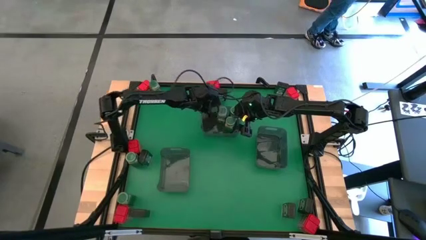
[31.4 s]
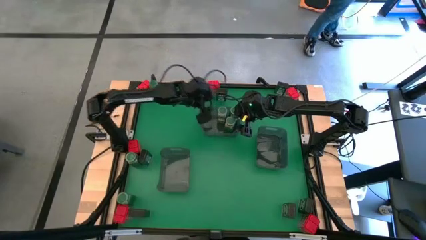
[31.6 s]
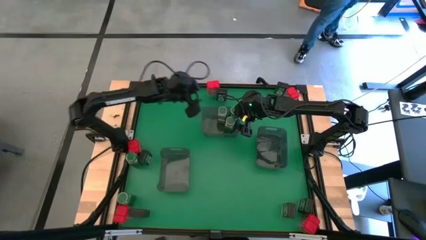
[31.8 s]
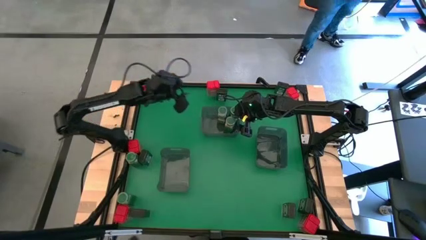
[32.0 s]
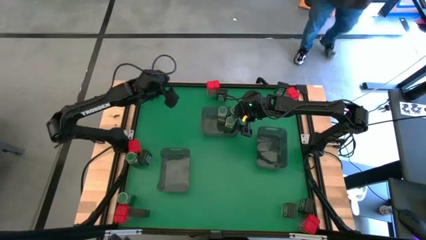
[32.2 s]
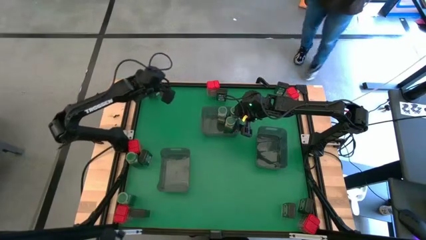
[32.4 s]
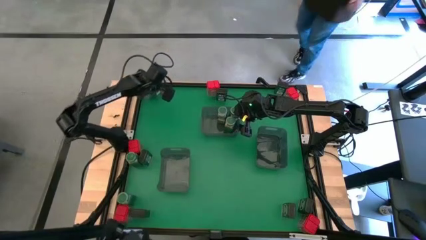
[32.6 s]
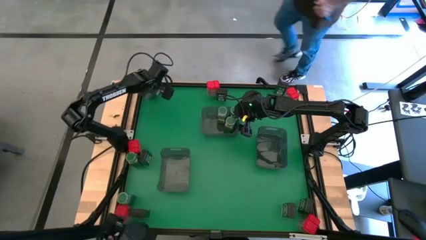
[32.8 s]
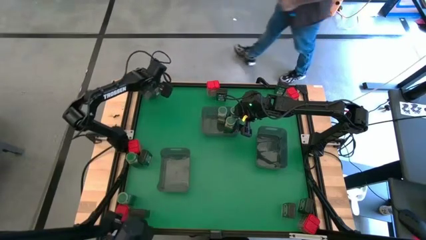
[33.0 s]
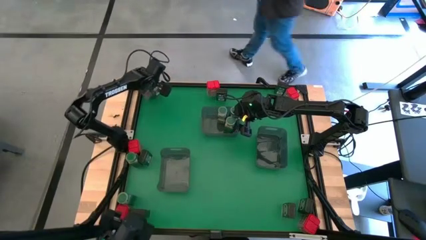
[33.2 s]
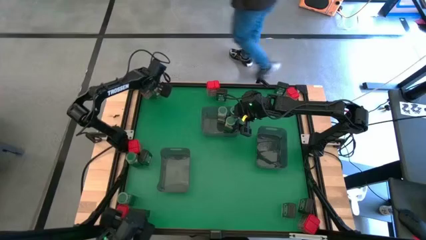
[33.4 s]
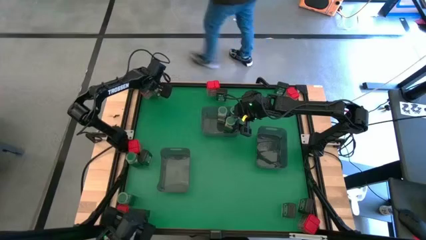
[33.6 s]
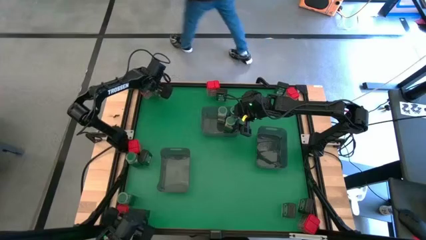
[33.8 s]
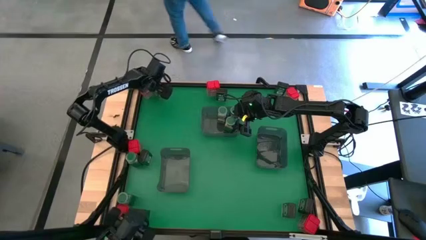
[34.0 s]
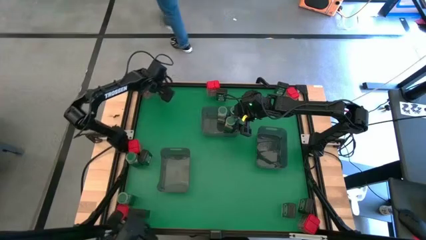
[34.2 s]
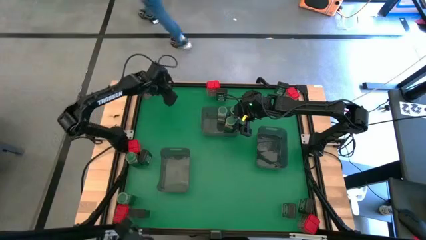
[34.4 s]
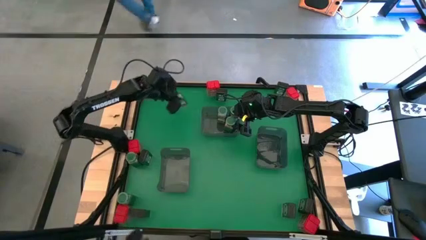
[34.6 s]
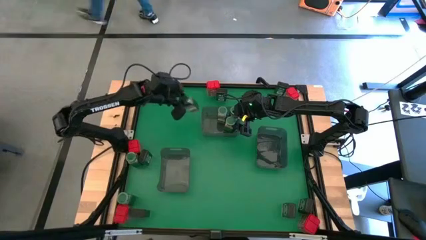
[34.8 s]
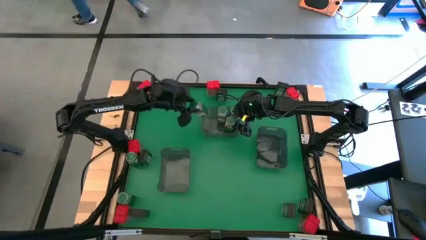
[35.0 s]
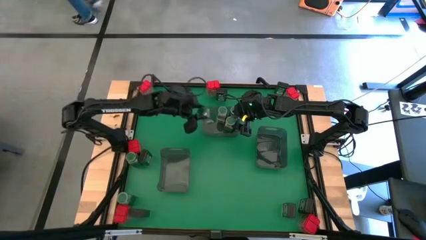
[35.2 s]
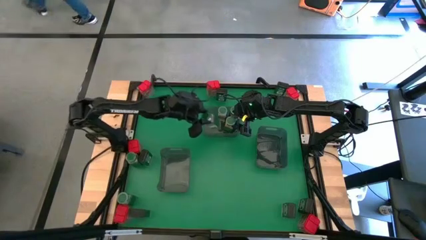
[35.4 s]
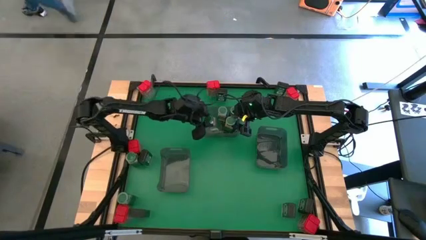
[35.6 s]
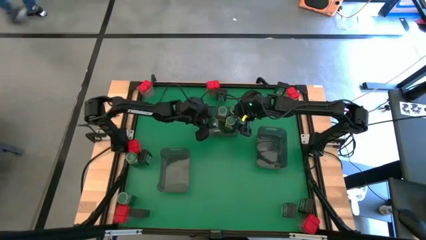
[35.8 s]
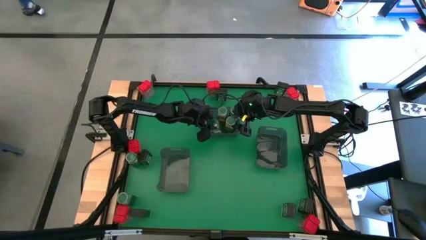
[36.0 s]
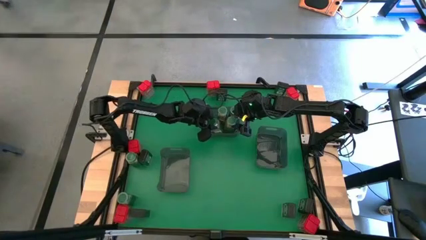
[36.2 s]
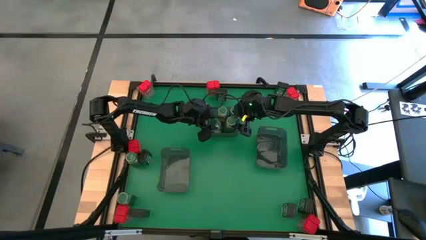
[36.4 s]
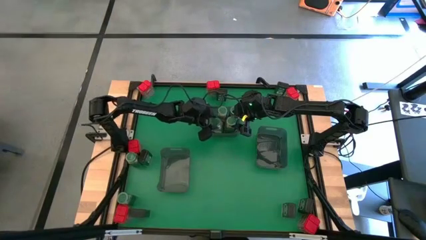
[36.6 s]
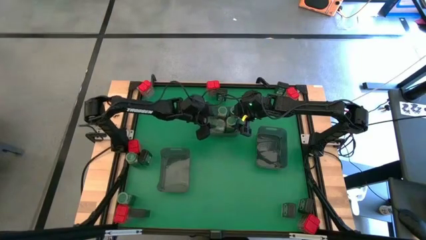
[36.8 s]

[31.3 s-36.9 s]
Task: Sort spices by type
Put the green seasoning bottle into the top black bin

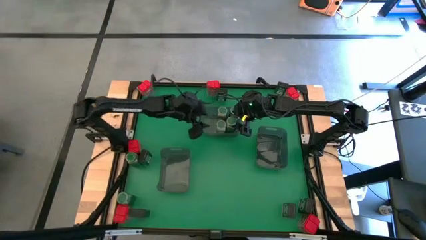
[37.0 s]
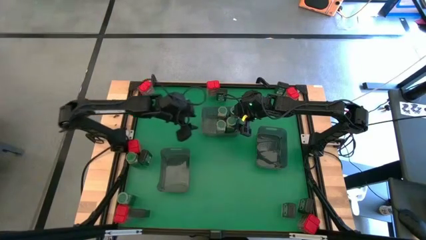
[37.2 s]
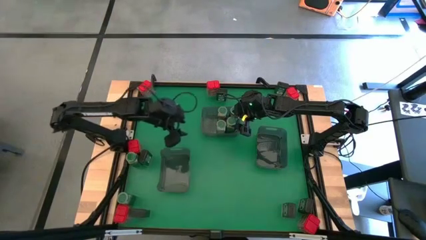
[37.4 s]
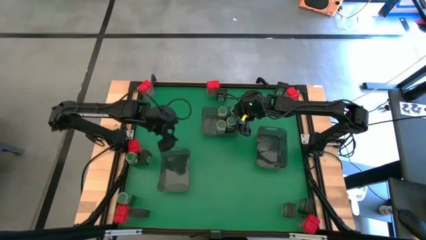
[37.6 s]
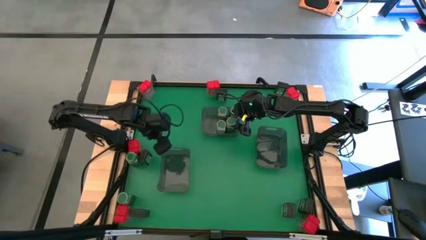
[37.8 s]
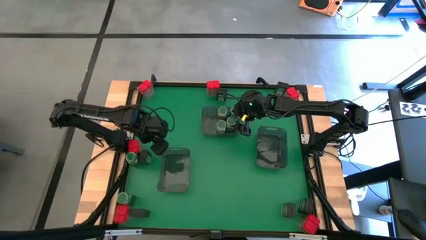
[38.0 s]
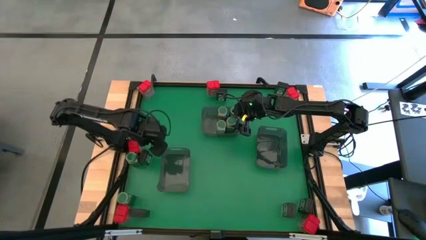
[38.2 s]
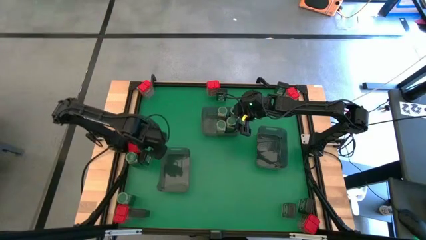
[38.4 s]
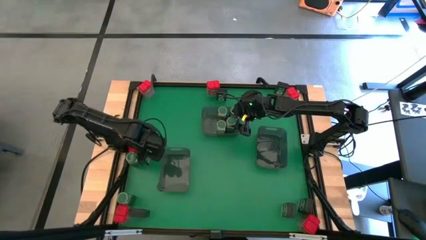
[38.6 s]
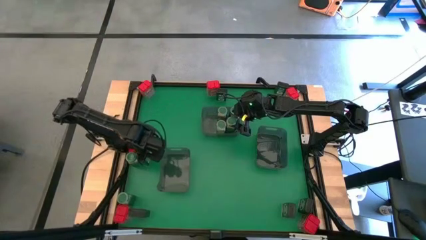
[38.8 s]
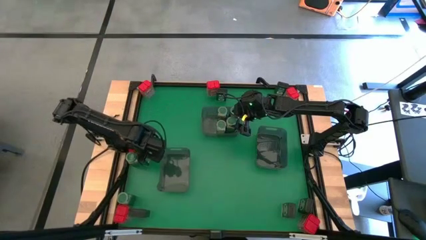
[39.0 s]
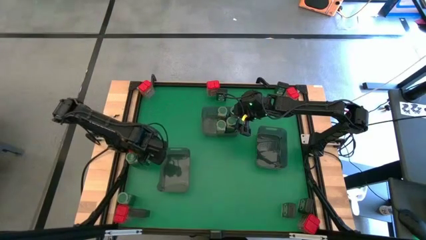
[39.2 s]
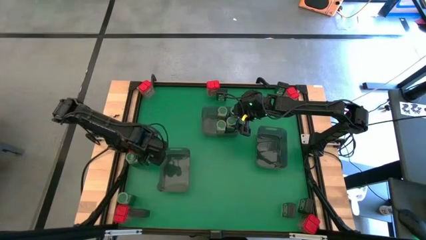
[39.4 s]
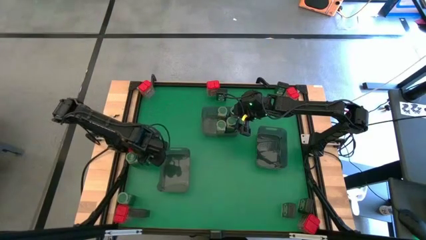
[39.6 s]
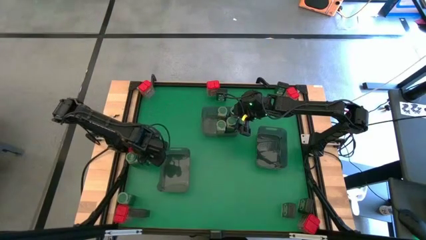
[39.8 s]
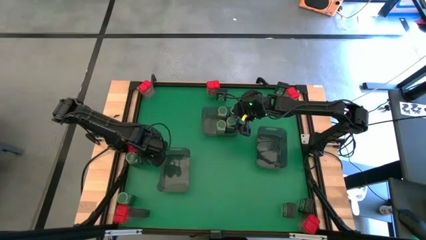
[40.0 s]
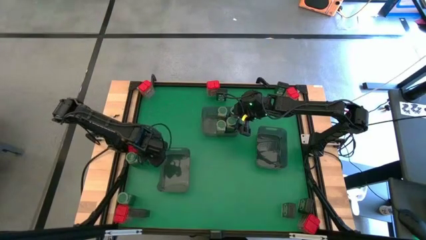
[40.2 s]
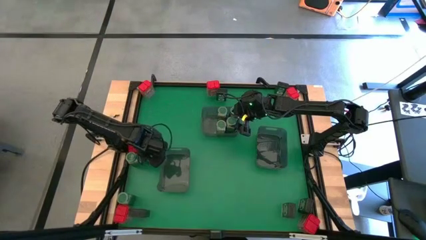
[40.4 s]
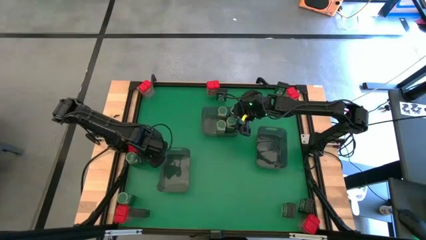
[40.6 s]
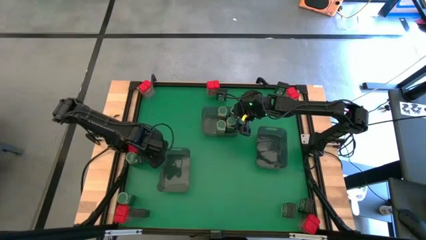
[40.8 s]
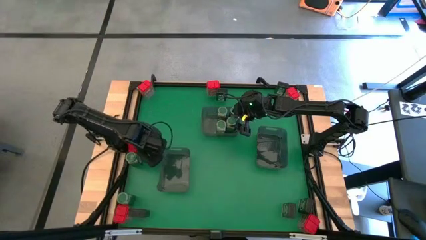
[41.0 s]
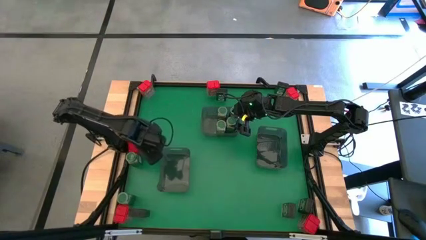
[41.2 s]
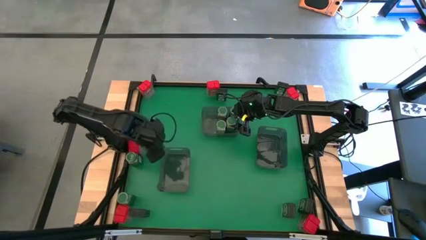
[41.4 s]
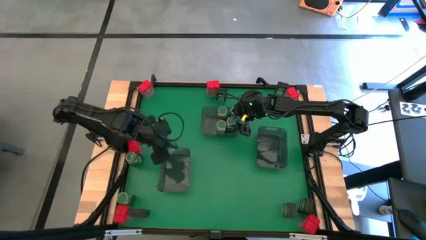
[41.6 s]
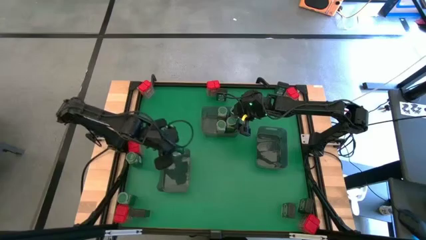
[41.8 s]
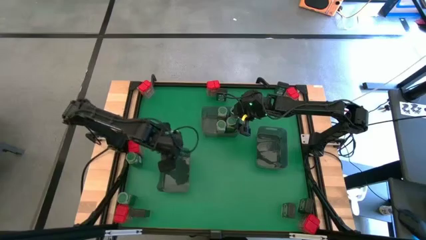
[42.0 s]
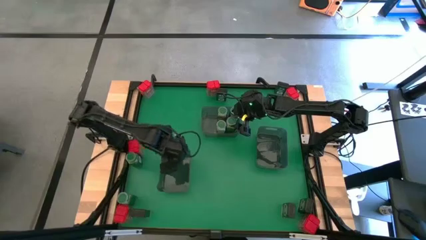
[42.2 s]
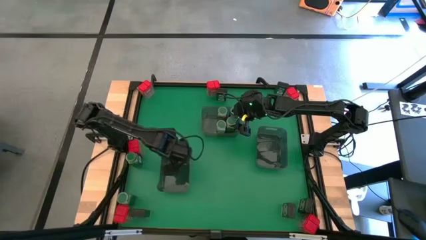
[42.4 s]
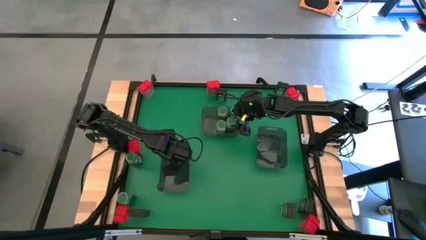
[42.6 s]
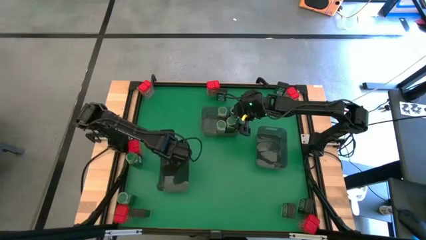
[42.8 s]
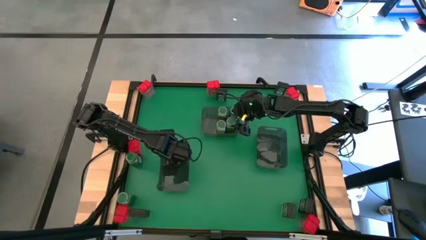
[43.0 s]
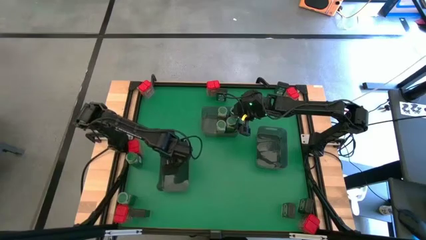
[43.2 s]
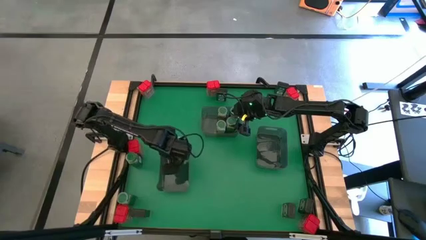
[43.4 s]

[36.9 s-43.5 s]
Put the black seasoning can into the left black bin

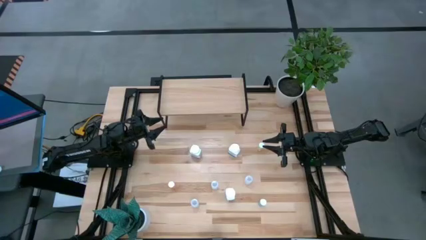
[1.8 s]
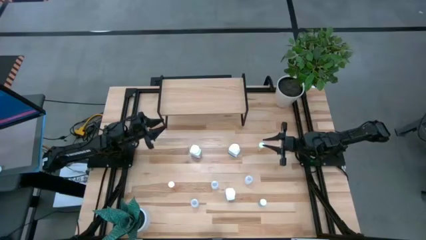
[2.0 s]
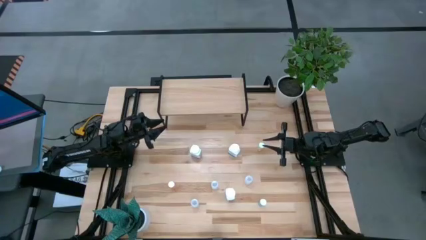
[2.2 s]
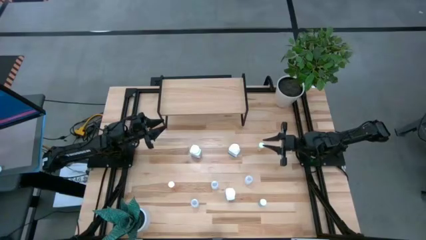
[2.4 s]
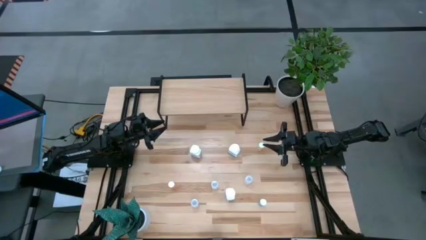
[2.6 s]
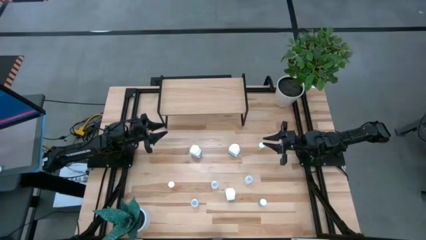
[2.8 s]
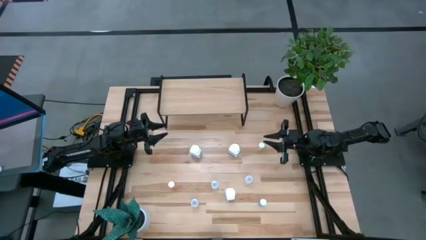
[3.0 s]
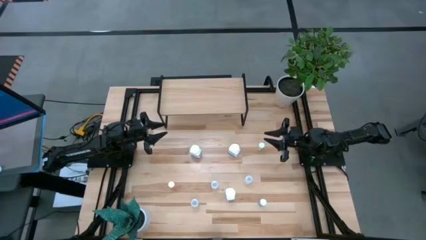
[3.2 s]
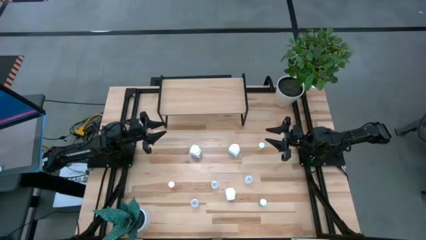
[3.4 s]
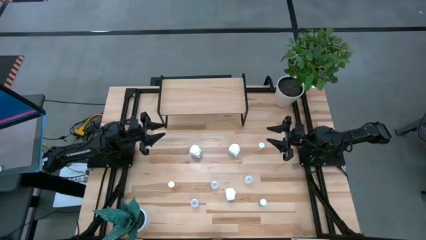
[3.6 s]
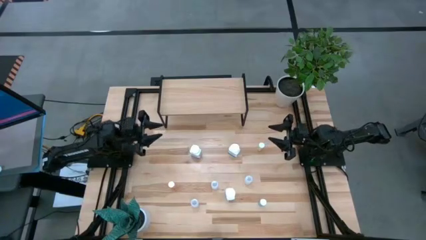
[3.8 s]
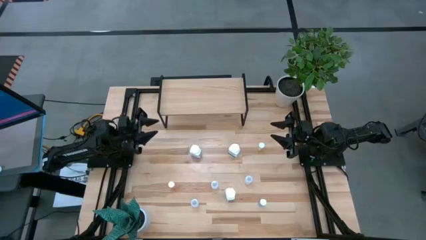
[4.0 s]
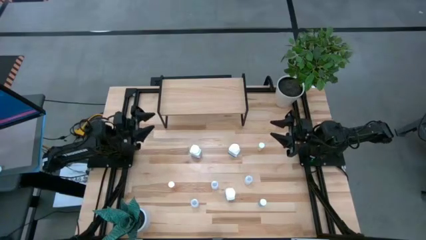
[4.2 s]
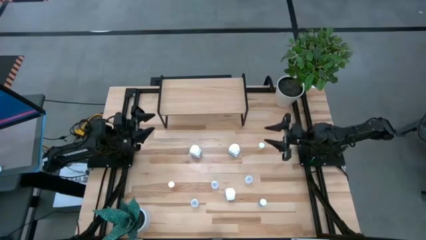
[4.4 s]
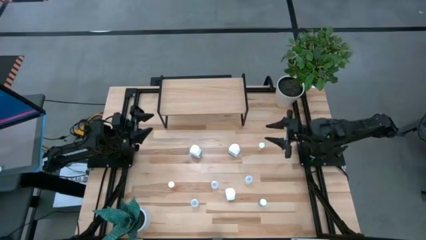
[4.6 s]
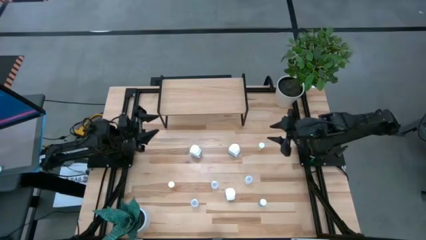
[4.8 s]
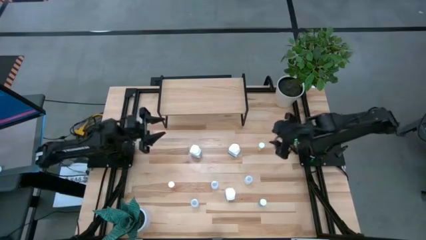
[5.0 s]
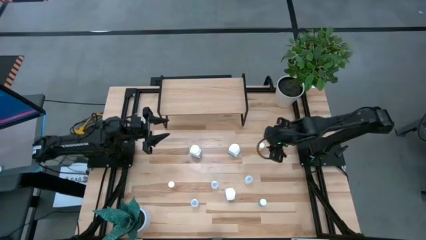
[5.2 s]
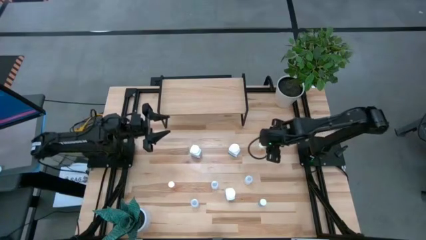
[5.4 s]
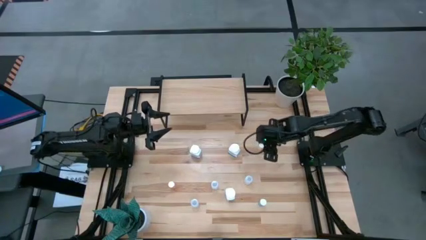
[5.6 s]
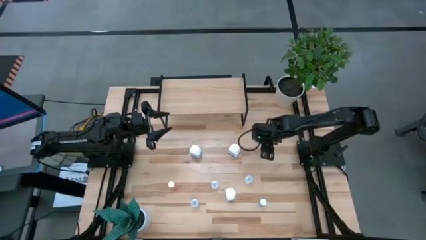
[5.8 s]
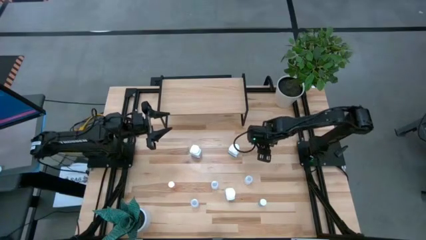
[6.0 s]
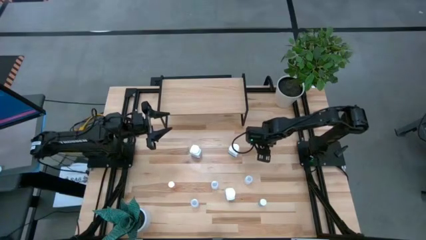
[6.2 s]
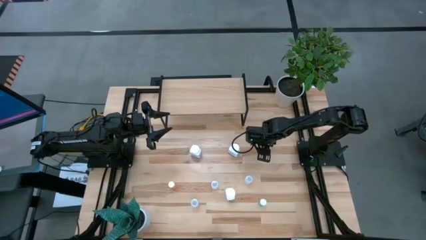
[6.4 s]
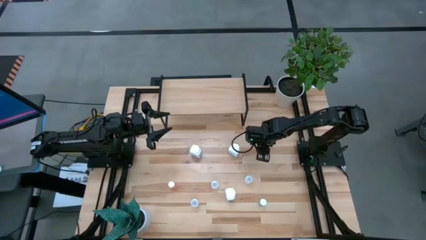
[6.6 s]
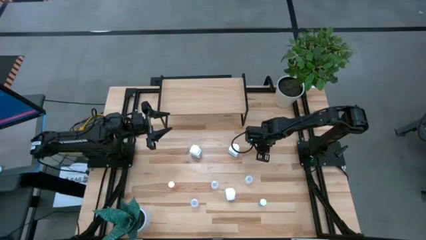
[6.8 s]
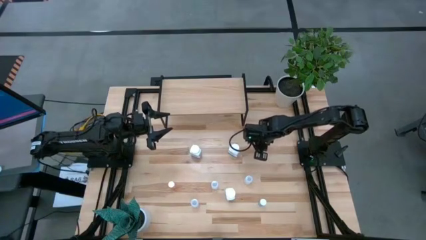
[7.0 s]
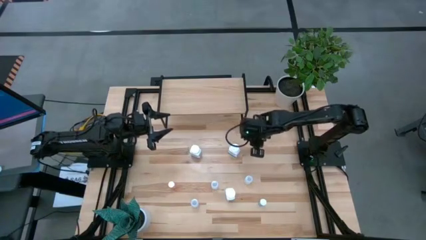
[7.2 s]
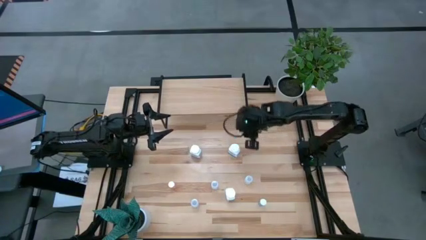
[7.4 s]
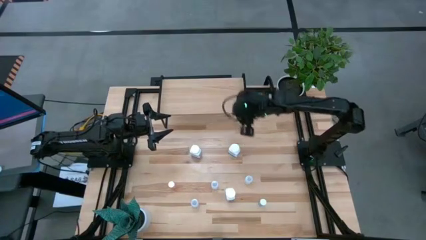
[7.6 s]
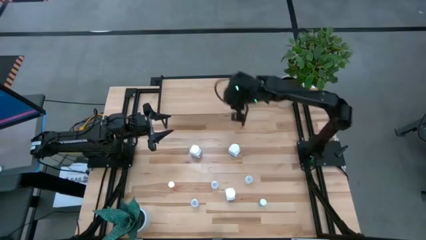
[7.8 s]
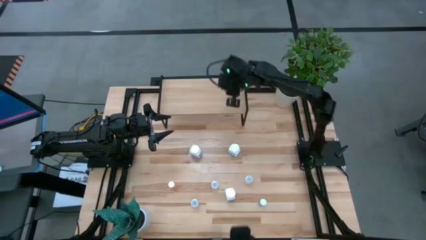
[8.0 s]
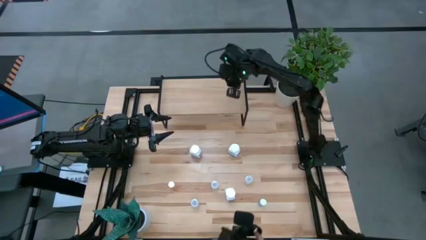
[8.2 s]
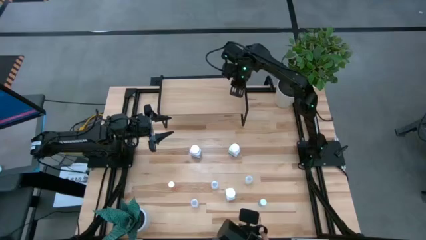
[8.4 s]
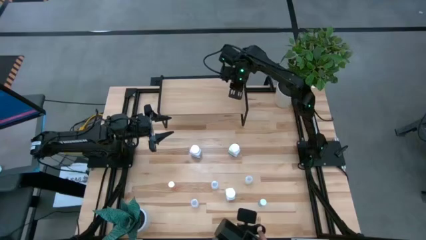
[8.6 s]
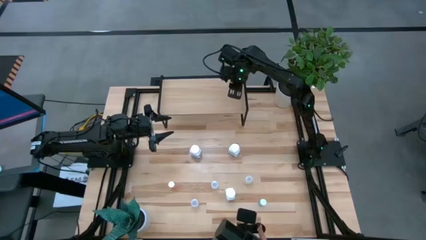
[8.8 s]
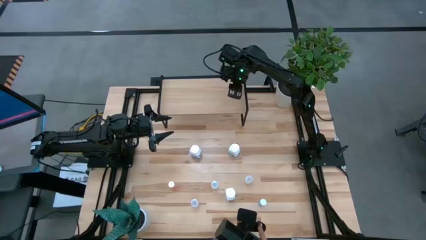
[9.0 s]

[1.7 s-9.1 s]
Task: Pick and place medicine bottles onto shelf by color
Put the yellow pill bottle on the shelf
